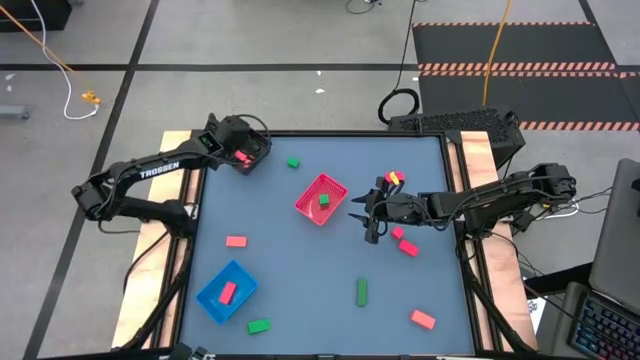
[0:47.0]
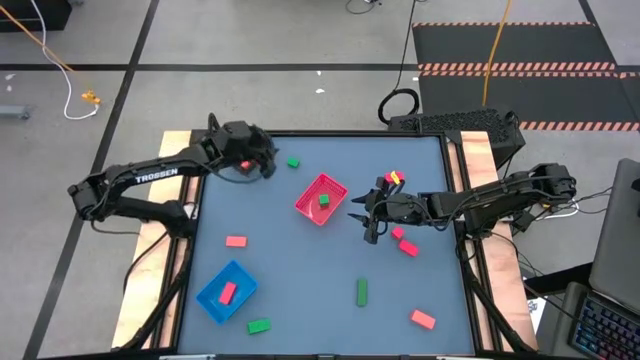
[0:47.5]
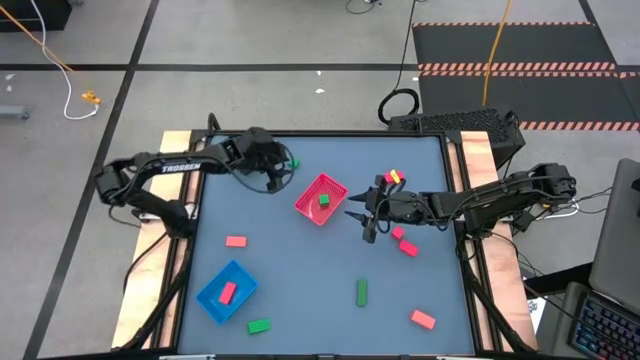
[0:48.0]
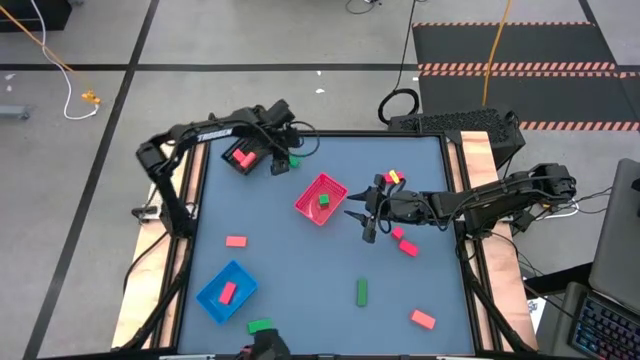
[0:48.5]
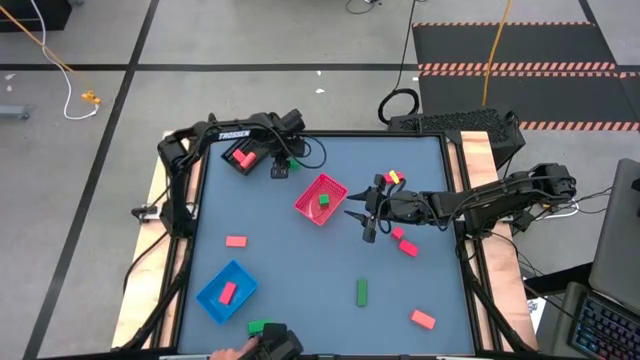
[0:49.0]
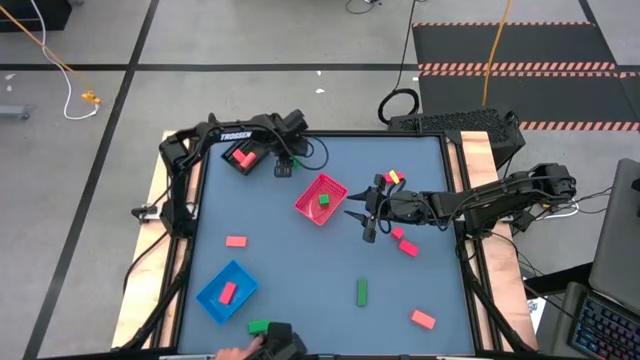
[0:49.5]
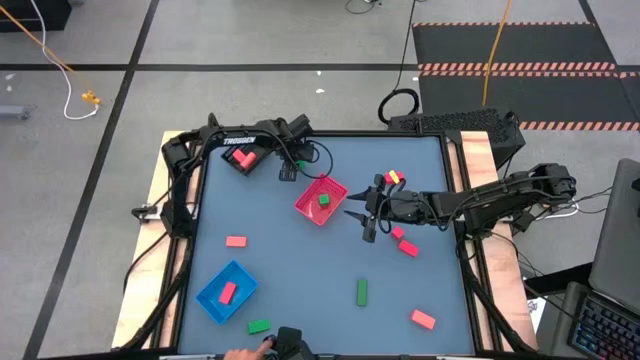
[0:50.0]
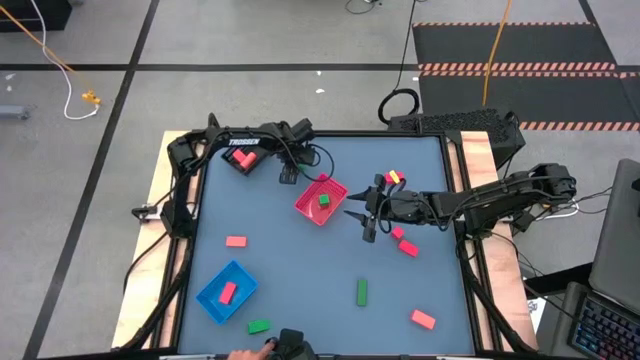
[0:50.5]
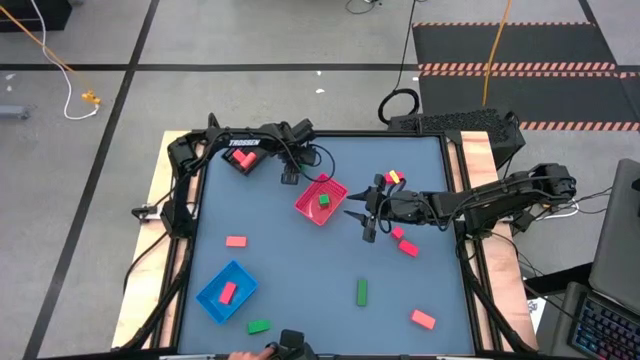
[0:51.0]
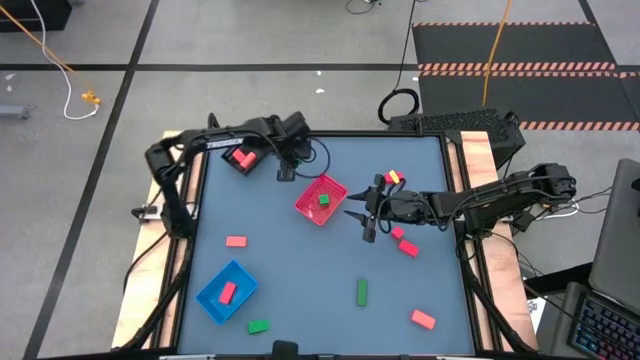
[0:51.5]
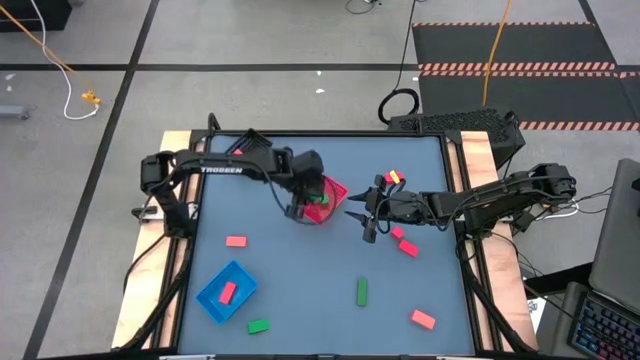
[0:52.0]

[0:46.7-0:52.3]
Task: Sort & place blocks by color
Put the green block into the orange bin

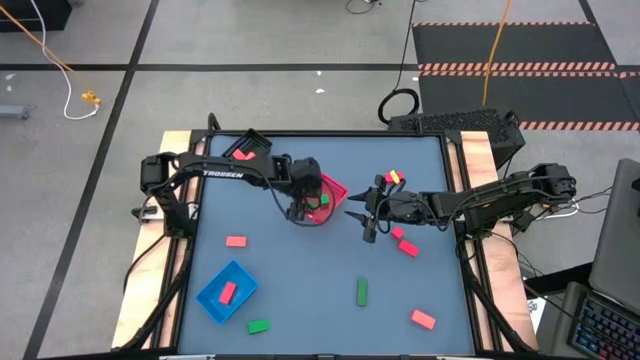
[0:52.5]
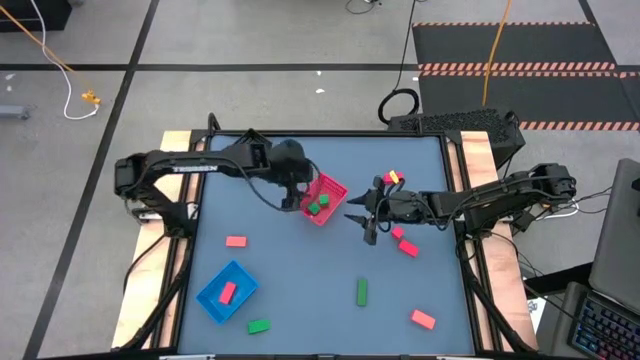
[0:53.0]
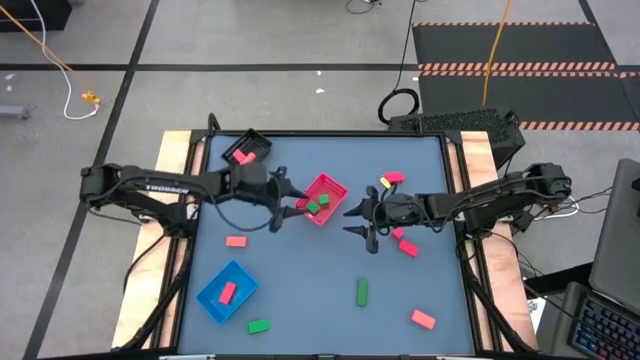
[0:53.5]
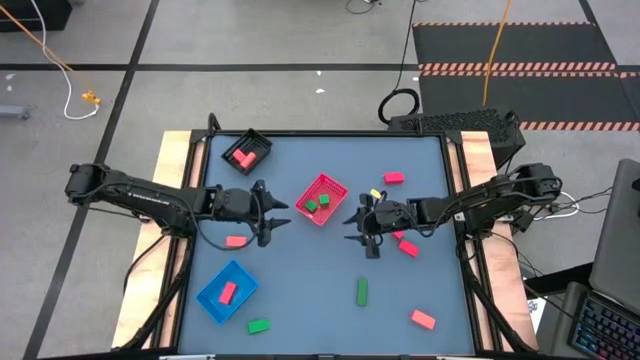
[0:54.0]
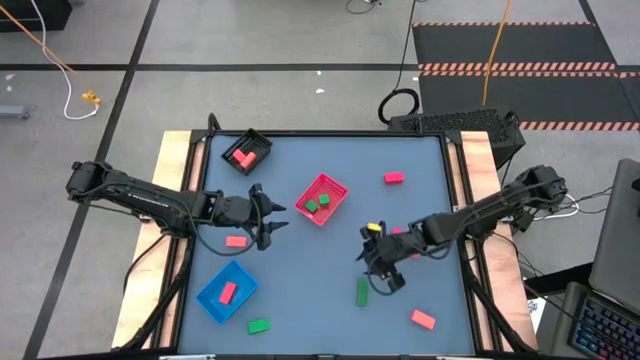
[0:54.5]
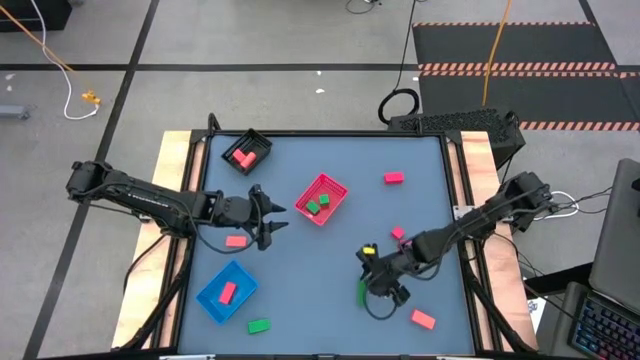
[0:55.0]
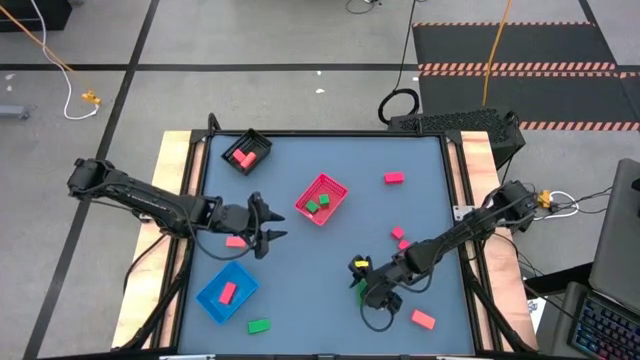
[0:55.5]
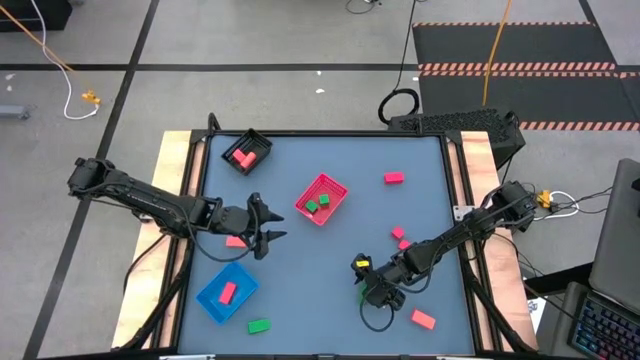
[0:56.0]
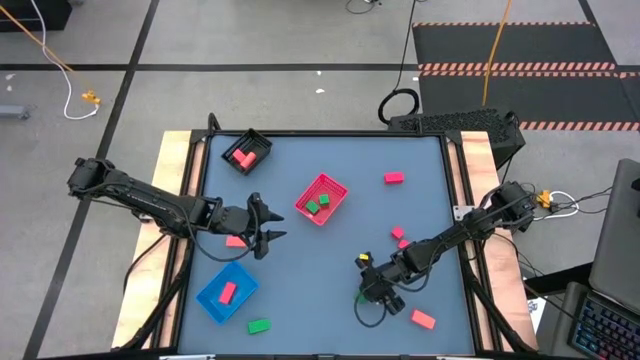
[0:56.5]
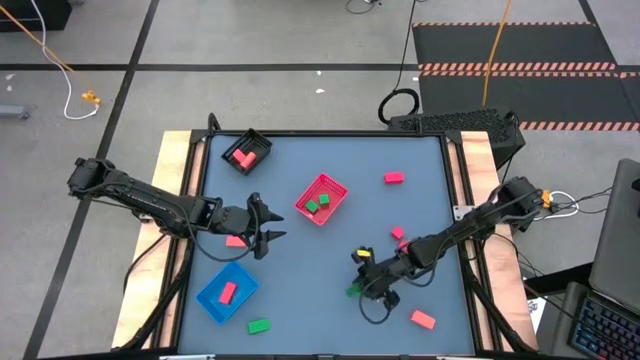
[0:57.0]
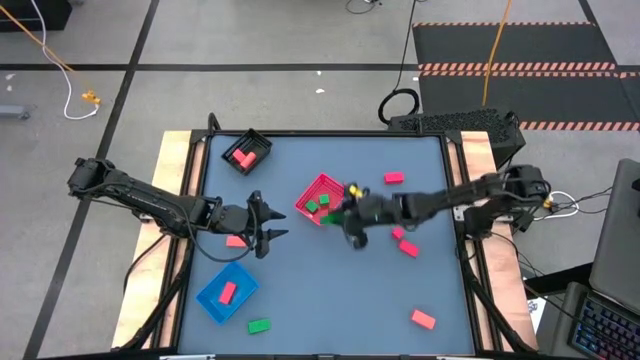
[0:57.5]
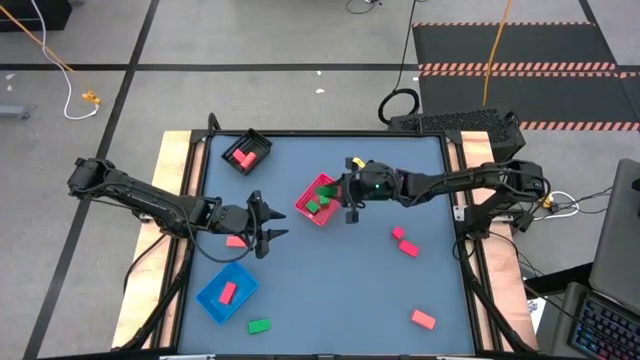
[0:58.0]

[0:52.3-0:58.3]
Put the green block into the orange bin

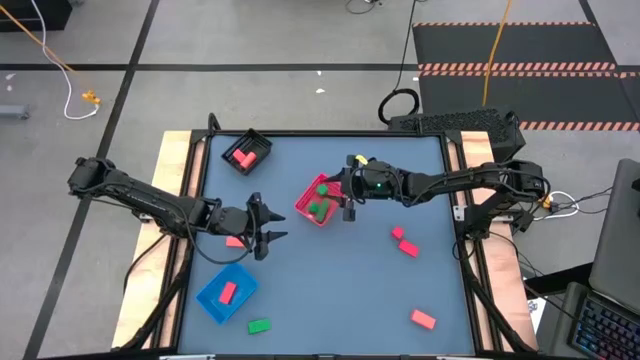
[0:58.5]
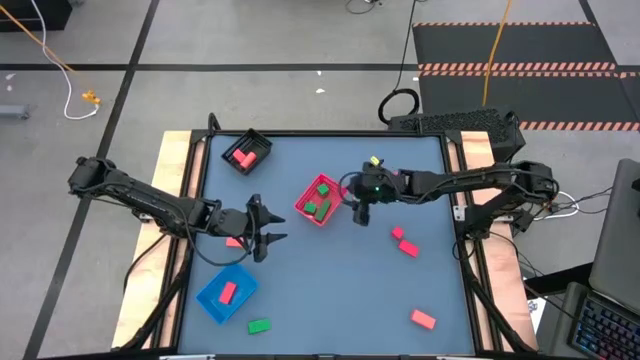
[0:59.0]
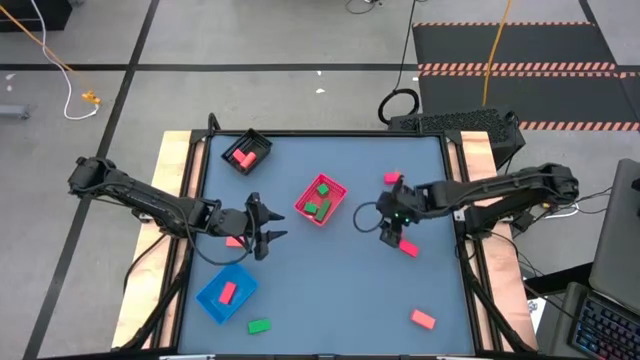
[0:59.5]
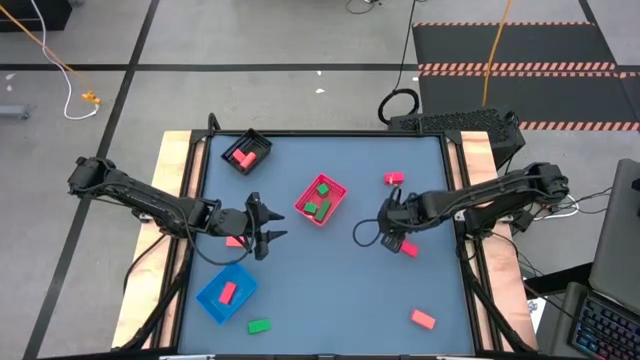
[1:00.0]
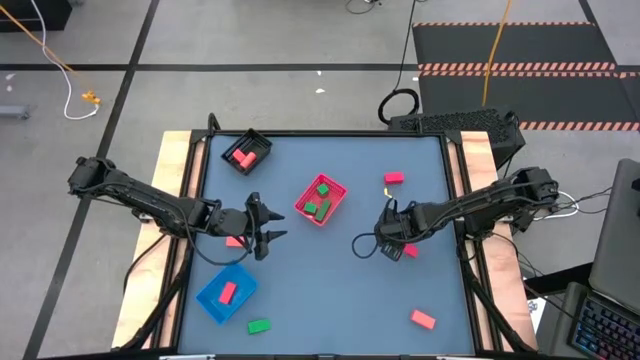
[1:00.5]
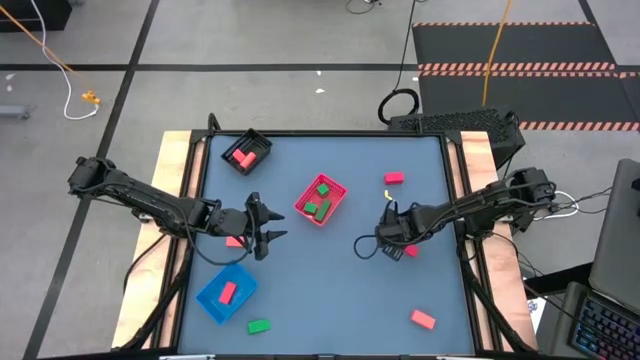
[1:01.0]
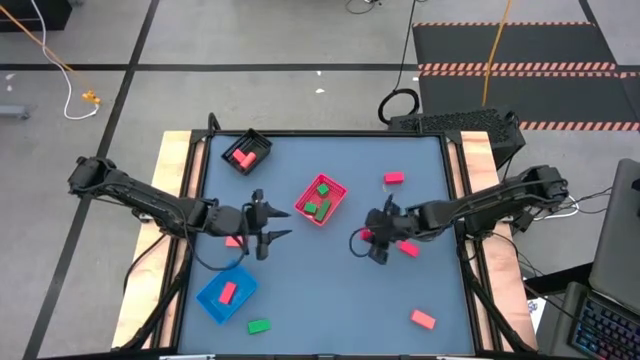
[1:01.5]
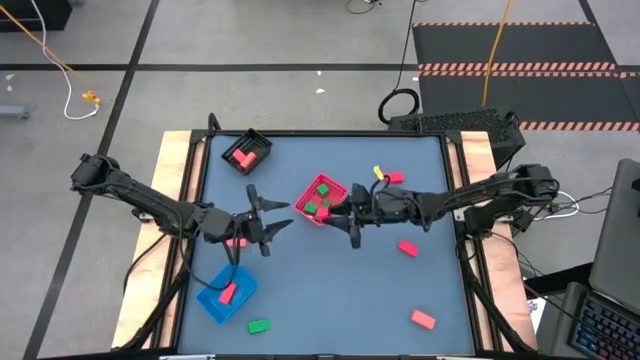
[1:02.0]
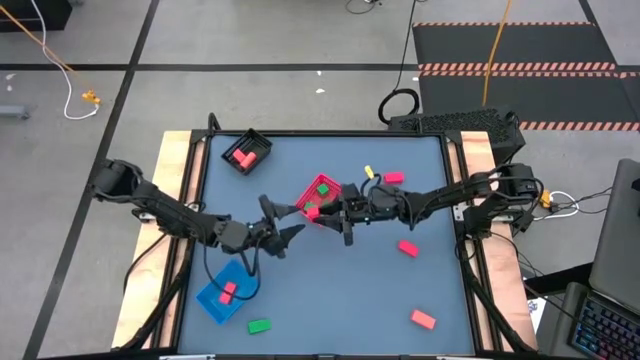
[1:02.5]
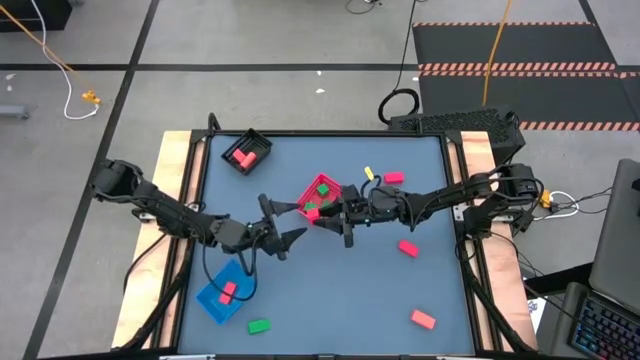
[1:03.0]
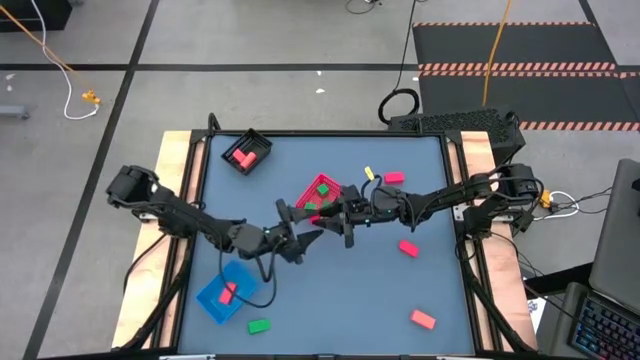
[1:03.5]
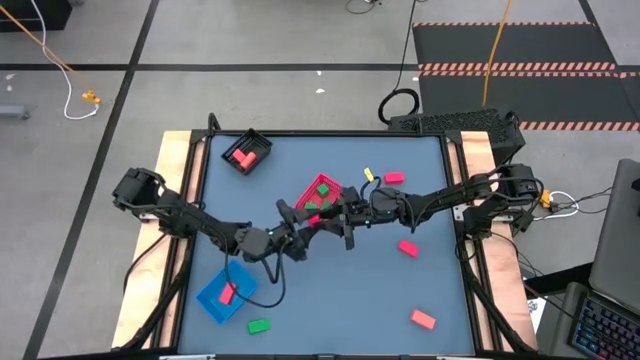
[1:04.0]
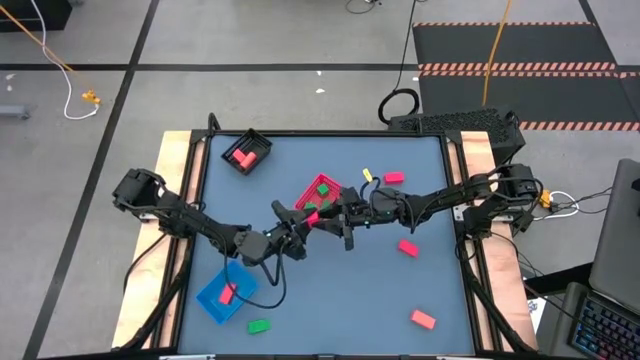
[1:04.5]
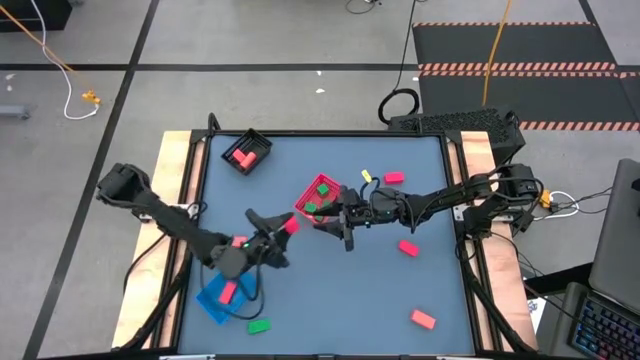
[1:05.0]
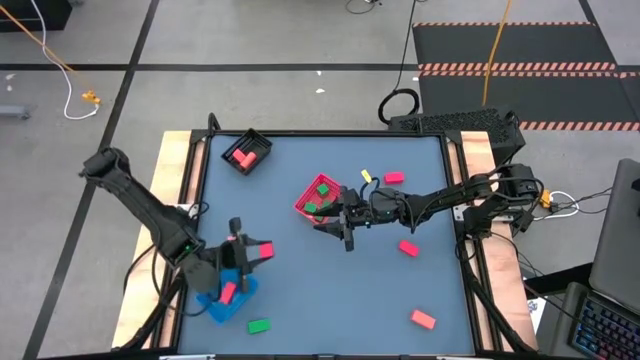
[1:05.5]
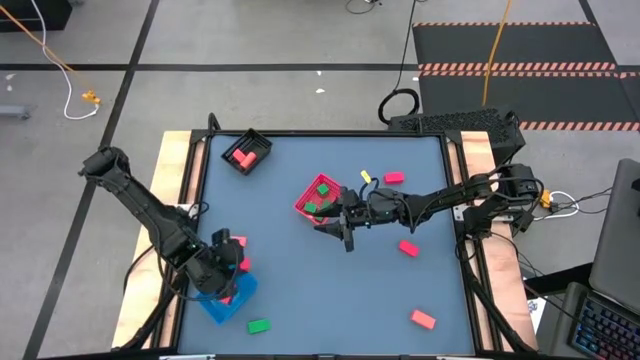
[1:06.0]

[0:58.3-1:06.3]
Put the red block into the blue bin

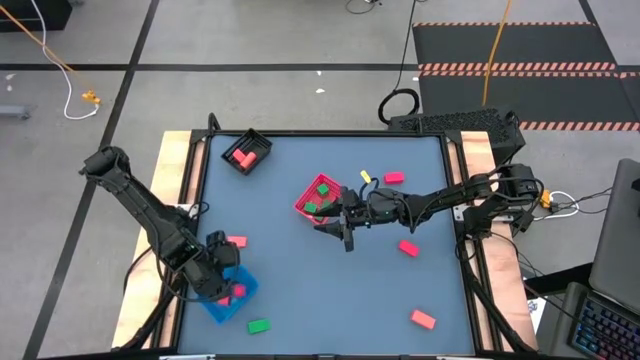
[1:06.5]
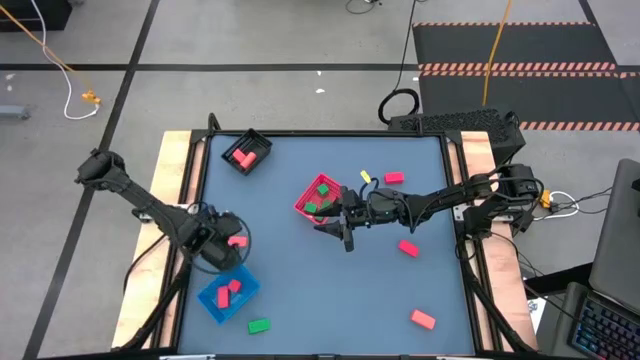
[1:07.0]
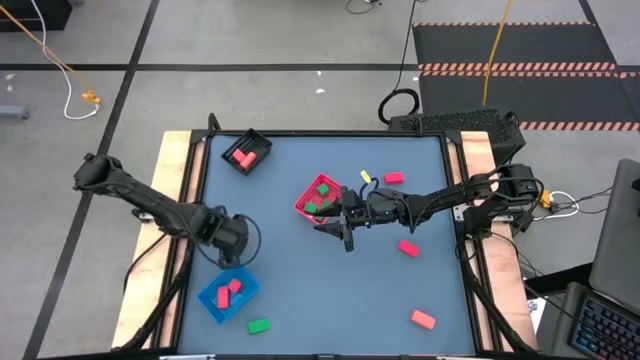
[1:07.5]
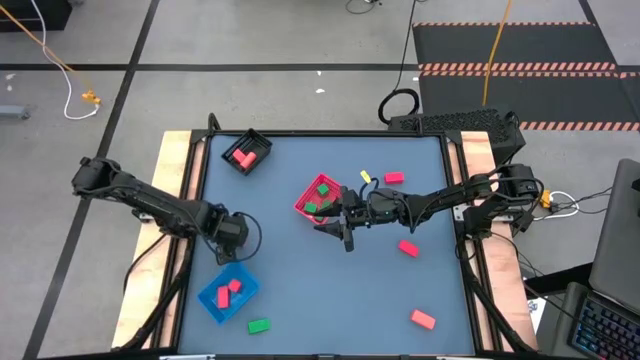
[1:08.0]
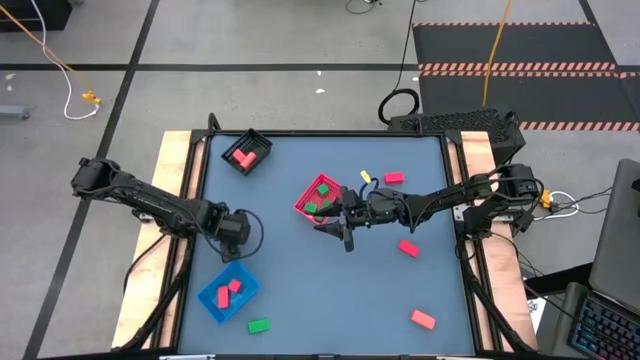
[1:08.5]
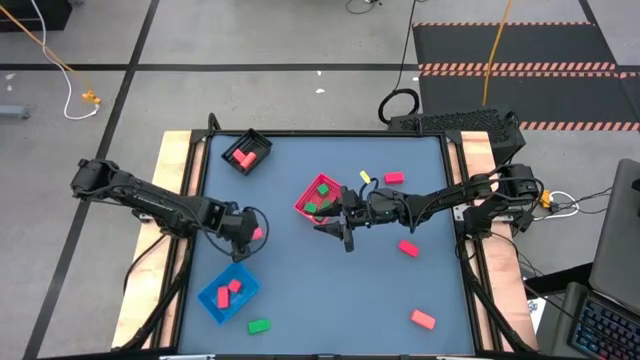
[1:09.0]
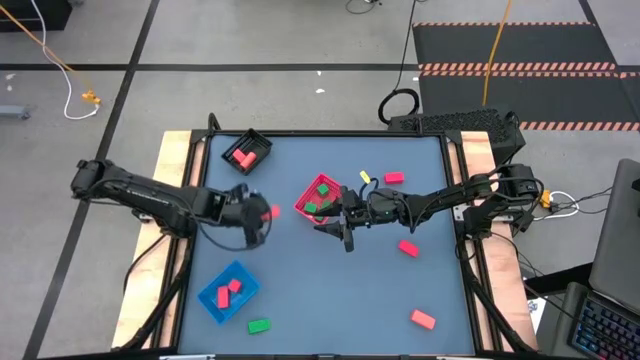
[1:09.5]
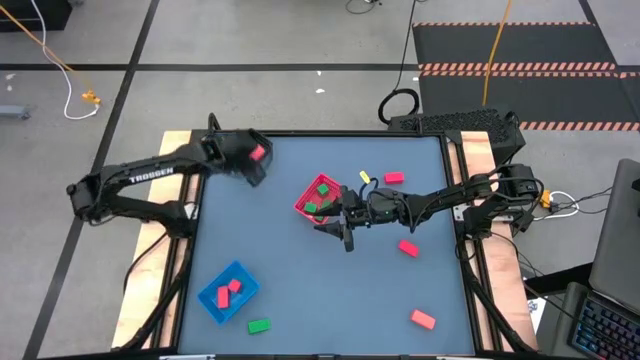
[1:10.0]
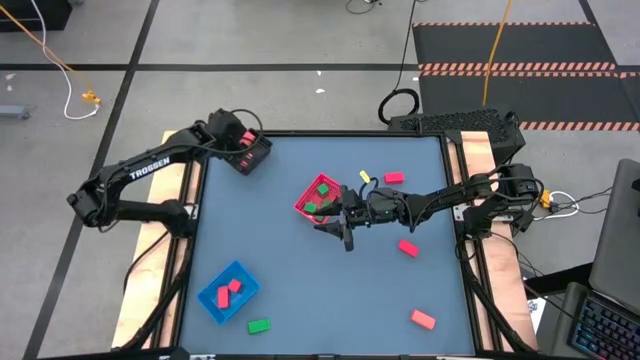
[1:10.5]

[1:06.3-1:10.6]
Put the orange block into the black bin
